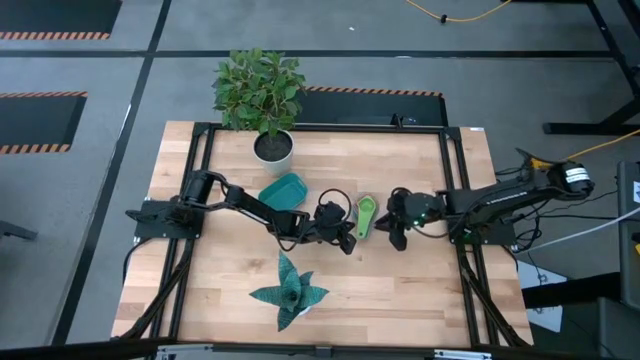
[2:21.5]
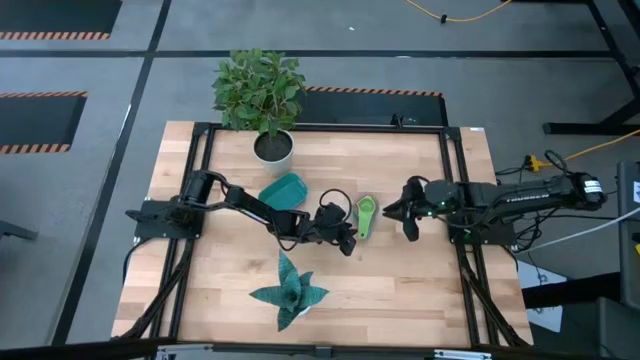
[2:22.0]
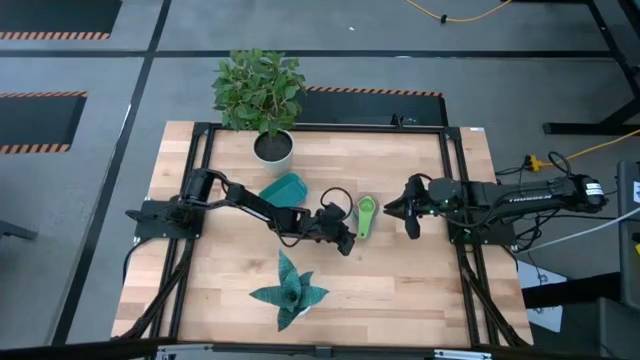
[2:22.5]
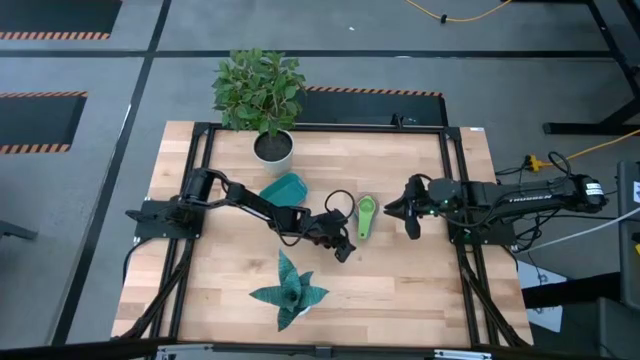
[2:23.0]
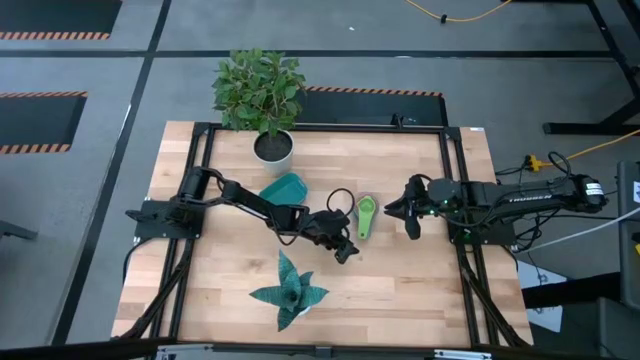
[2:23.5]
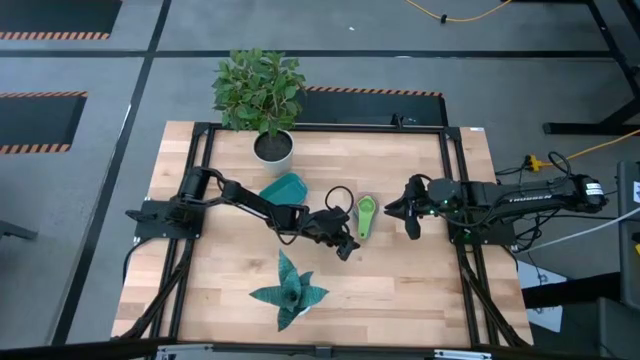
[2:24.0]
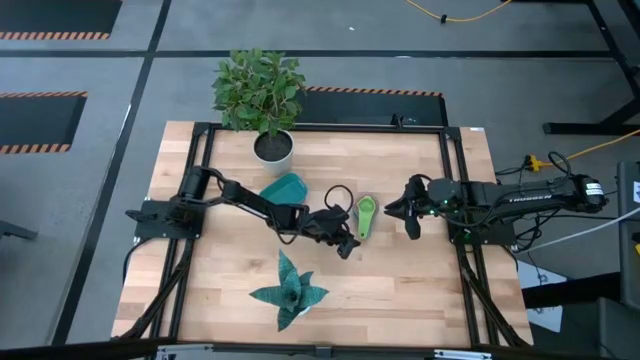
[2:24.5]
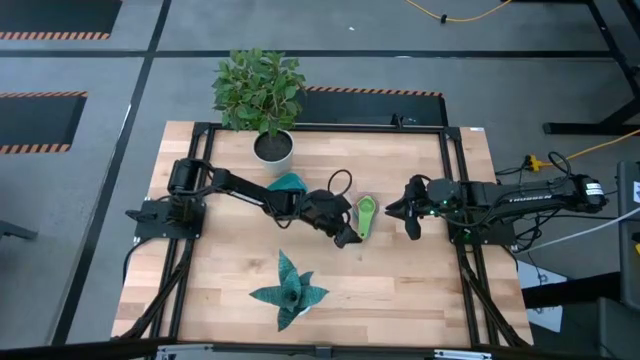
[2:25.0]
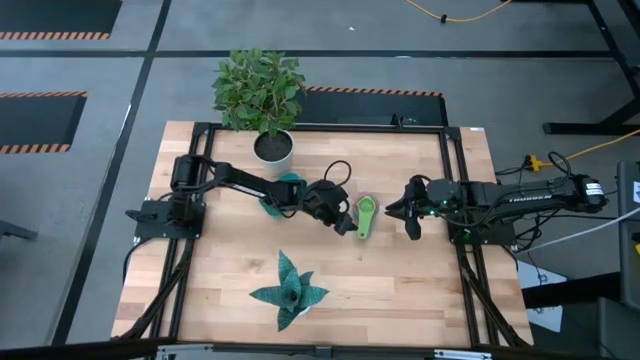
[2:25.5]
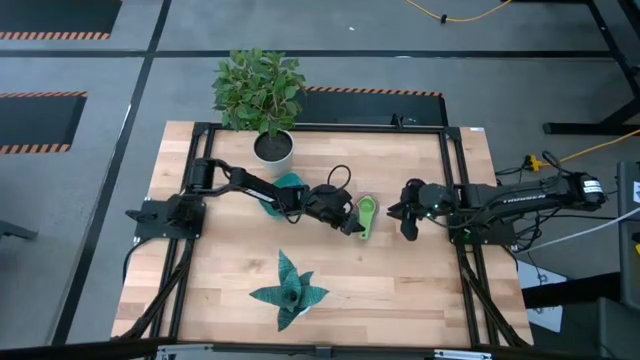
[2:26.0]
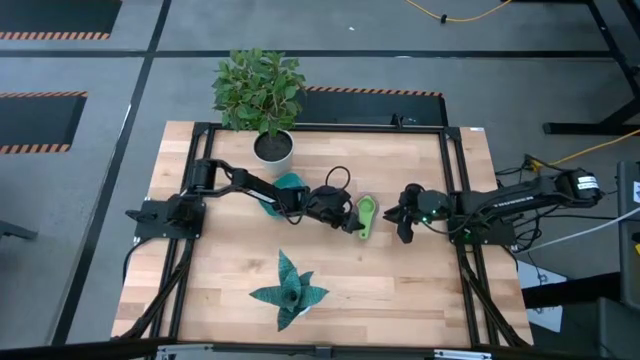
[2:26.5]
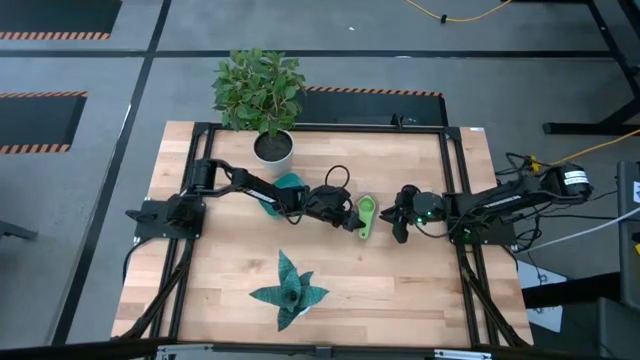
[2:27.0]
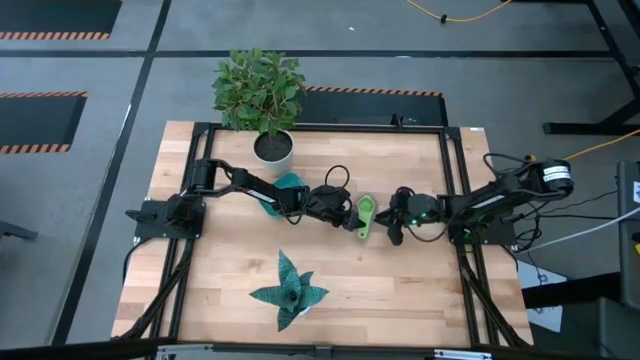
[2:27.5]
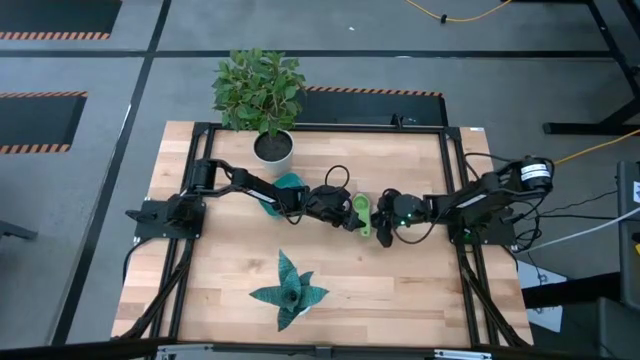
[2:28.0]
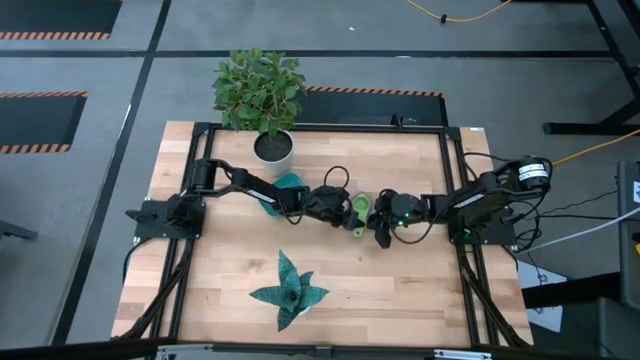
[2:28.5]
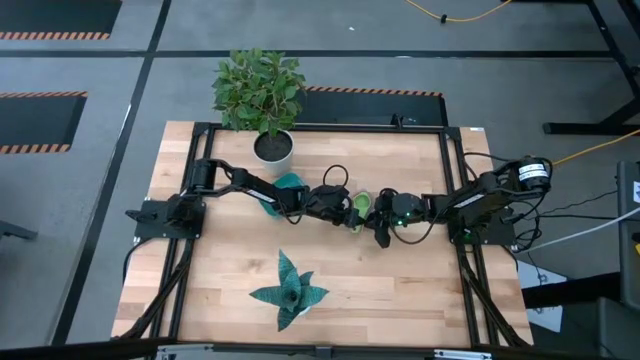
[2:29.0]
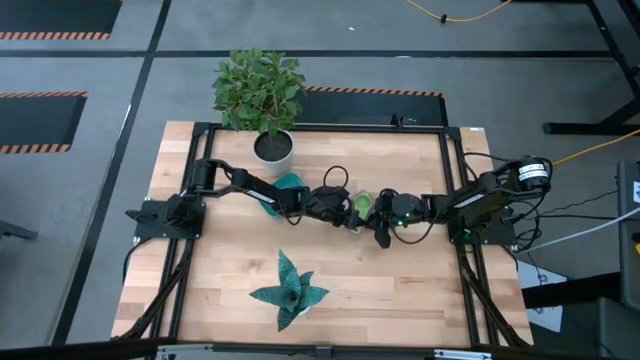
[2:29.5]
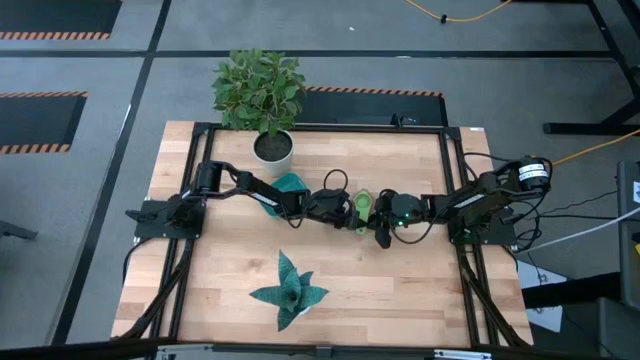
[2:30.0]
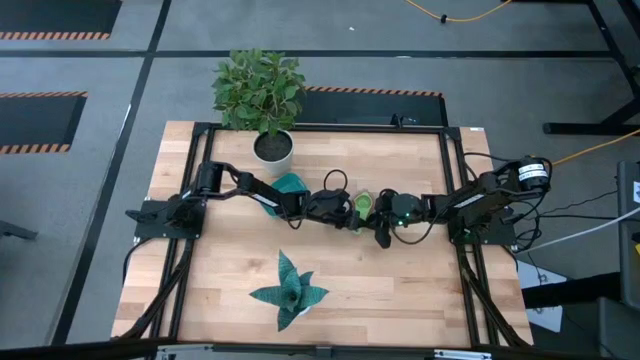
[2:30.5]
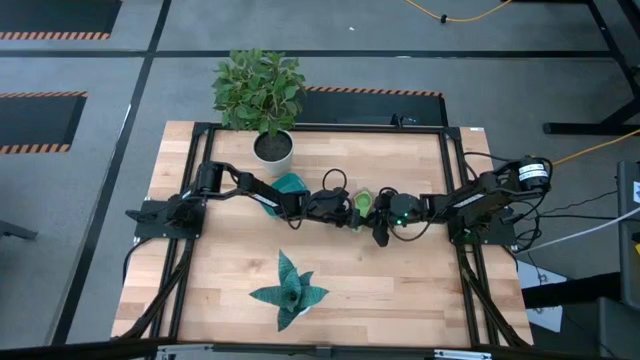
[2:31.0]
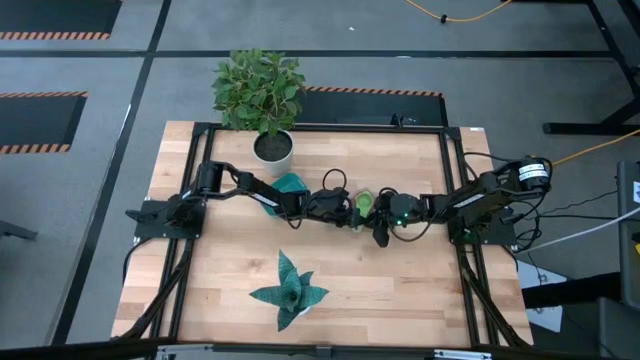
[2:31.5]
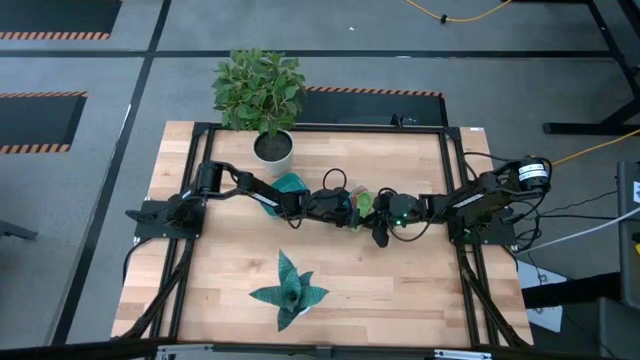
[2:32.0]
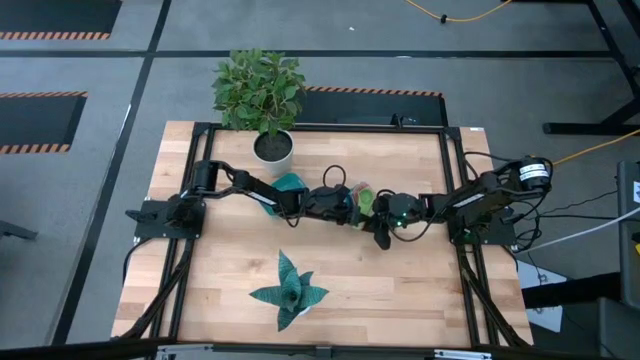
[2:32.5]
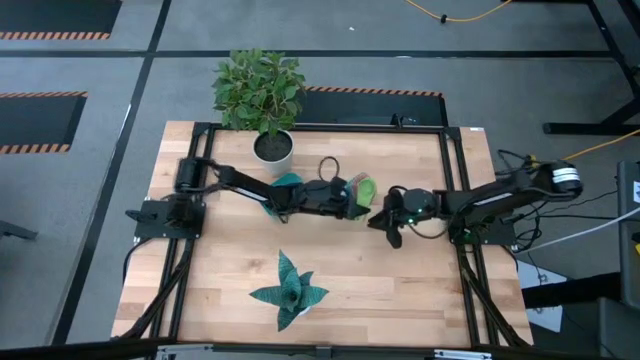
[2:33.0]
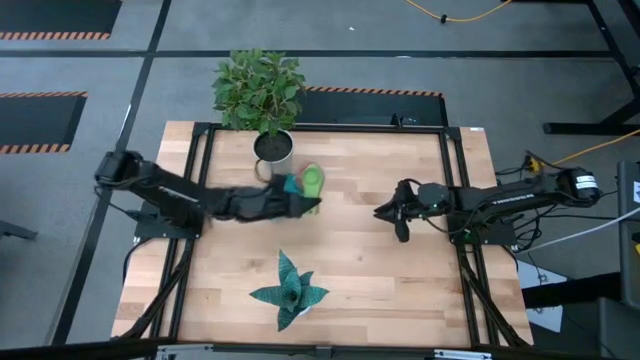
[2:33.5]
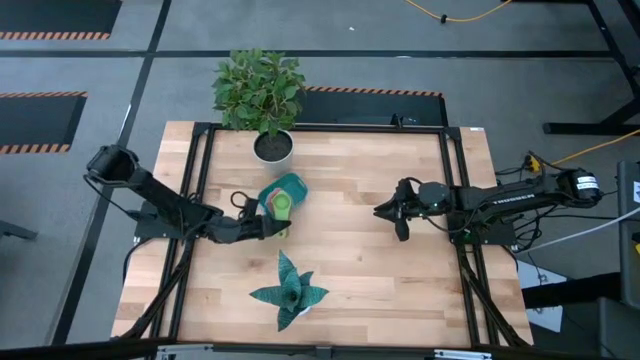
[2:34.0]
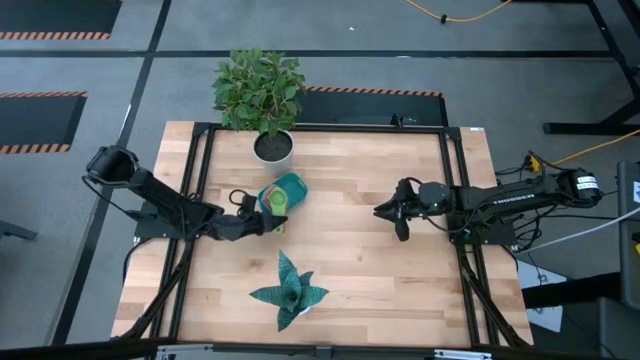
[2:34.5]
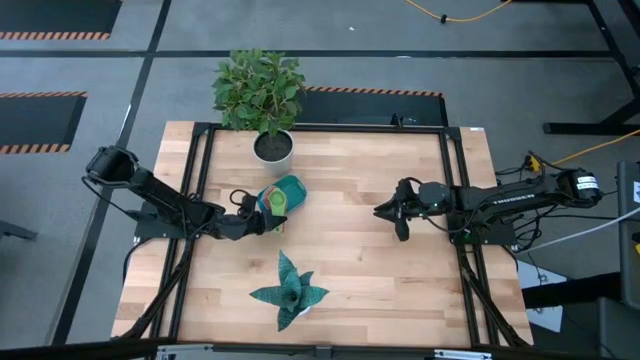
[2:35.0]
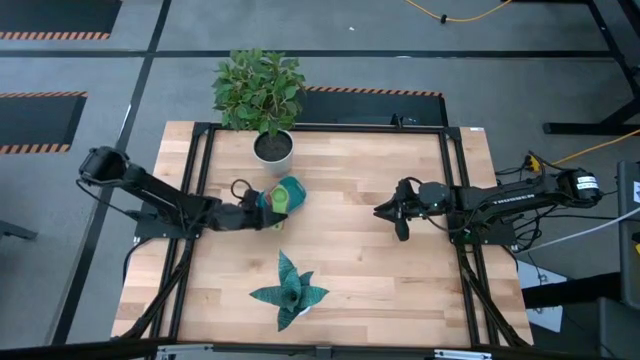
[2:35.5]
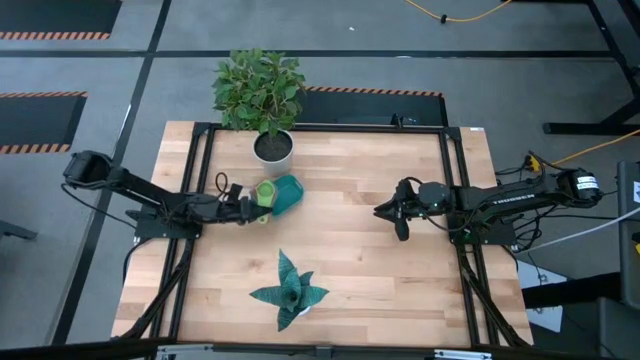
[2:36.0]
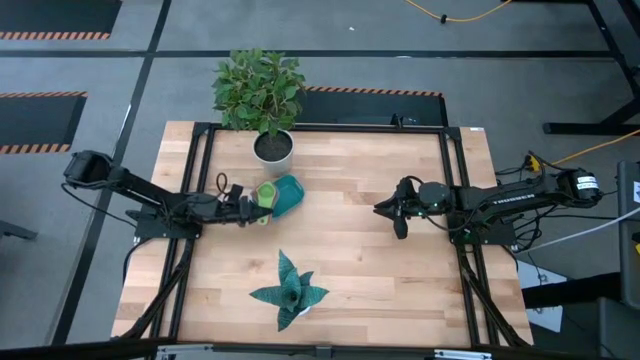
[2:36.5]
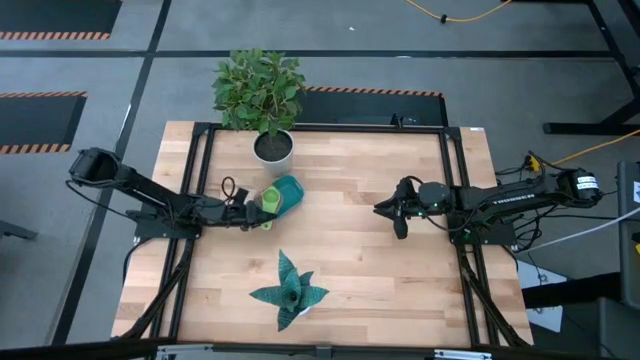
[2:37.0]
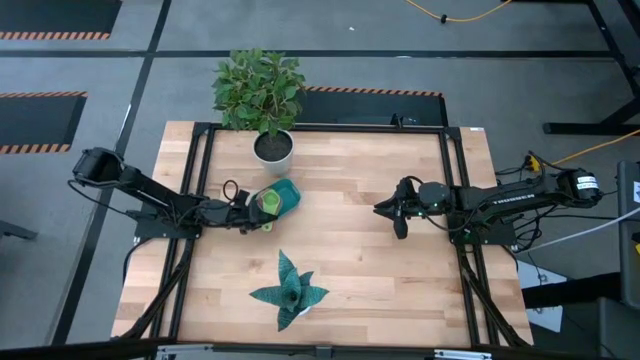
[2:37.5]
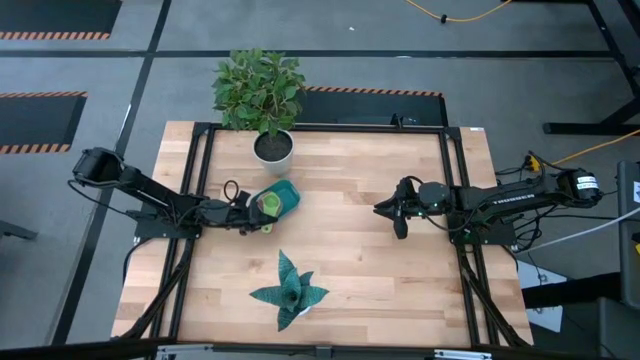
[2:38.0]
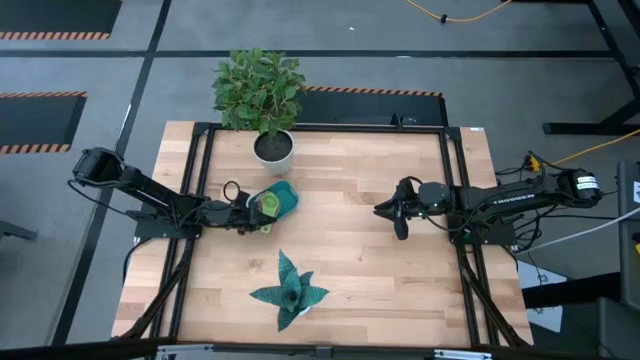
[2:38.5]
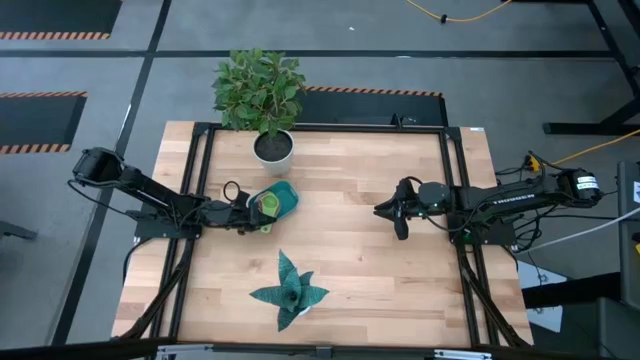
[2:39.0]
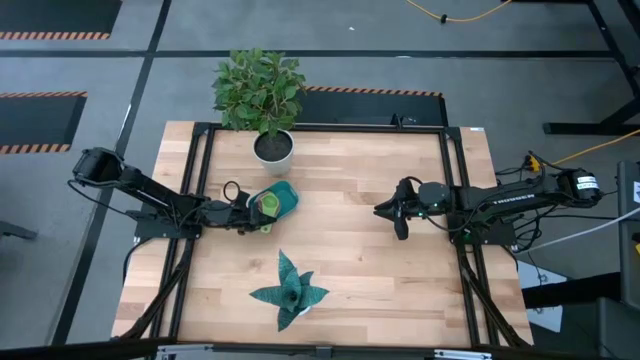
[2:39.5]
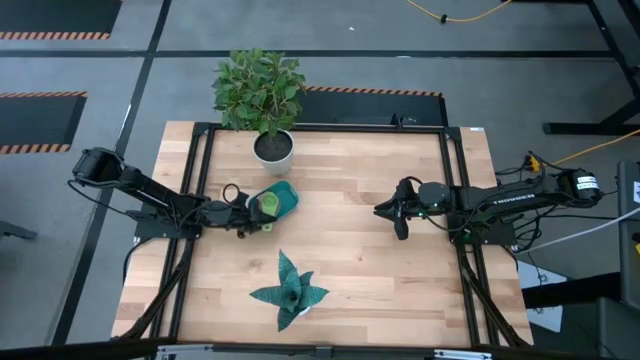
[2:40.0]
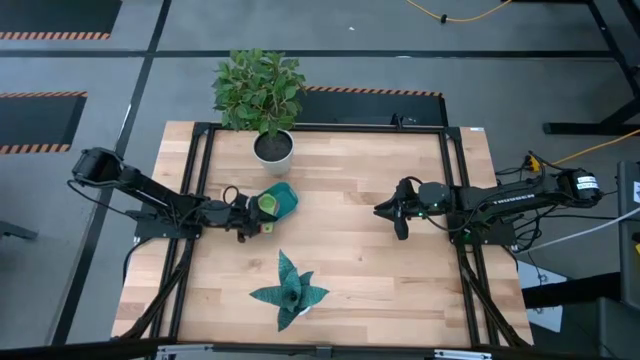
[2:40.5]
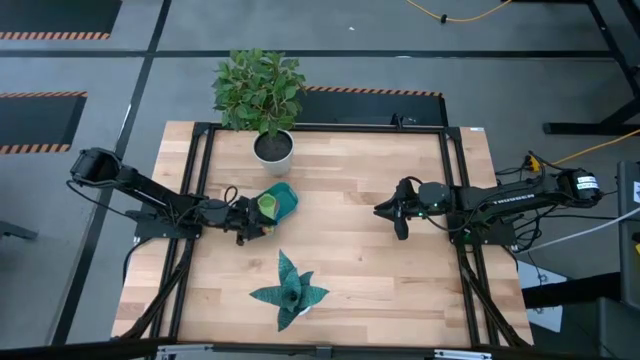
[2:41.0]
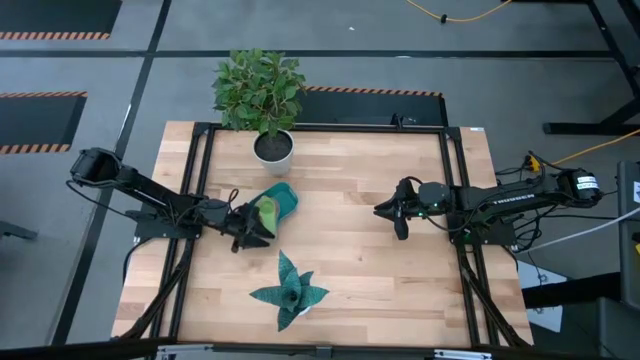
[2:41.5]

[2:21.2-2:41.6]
Task: Nest measuring cups in basket
Put the stacked measuring cups into the green bin

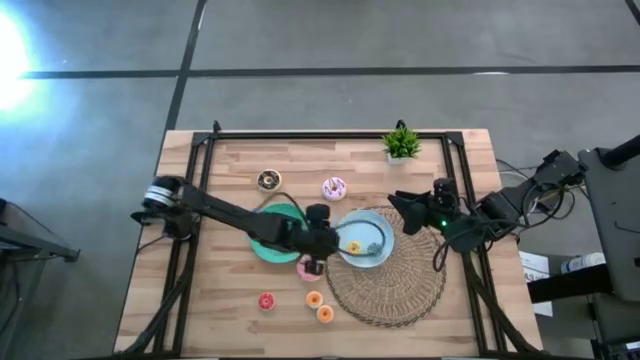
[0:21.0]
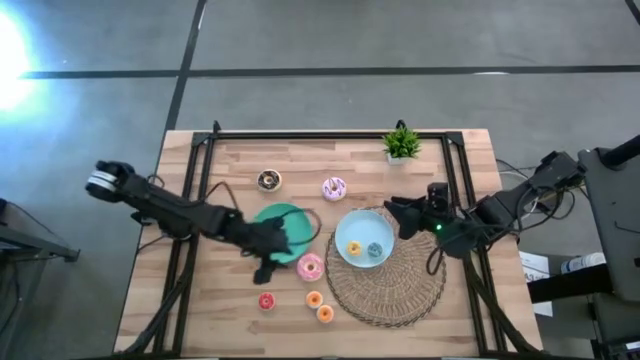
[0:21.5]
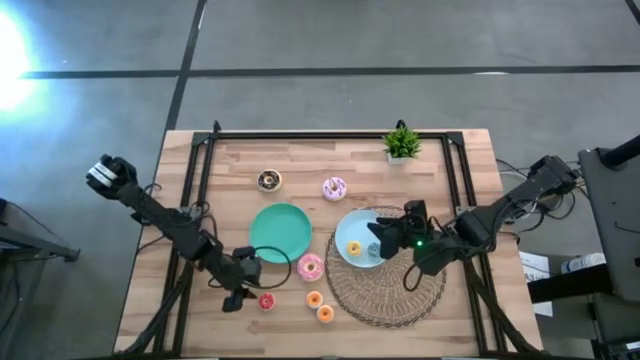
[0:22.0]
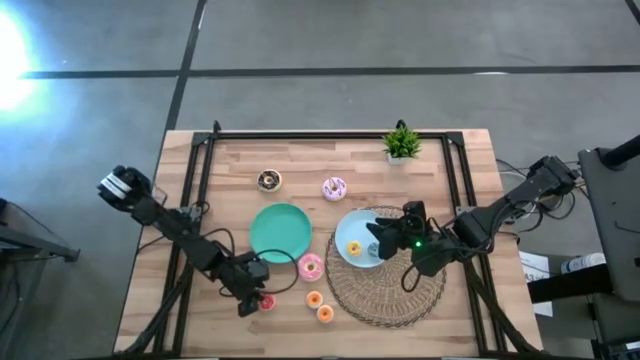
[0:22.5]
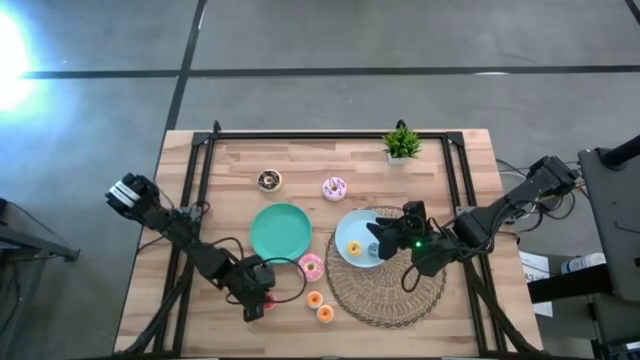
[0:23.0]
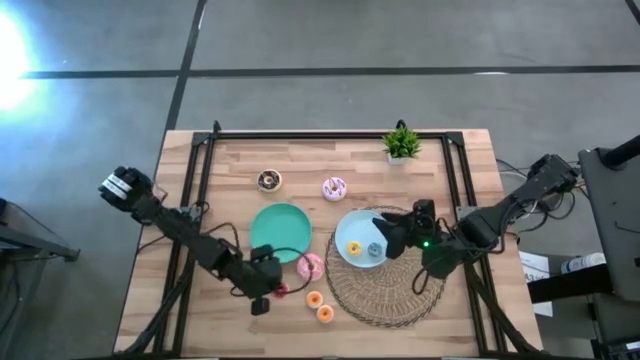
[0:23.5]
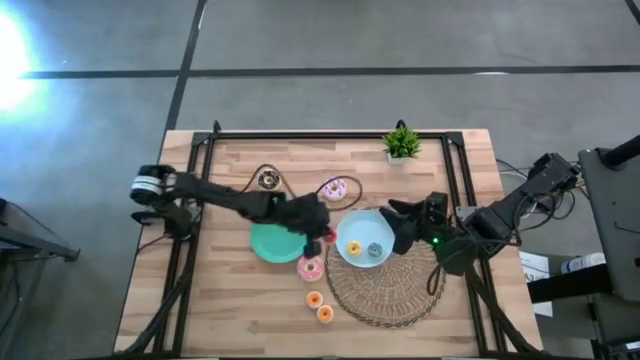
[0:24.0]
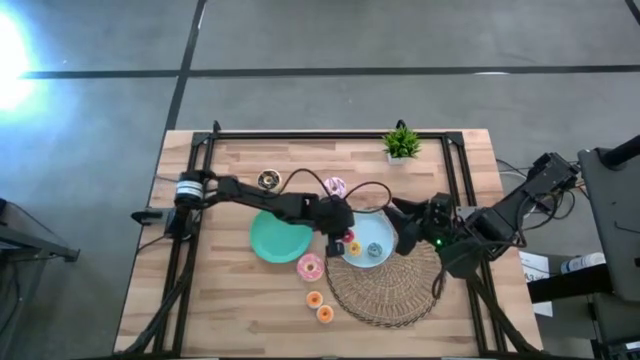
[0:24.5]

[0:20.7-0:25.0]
Task: Pick & Place donuts
Put the small orange donut on the blue plate
